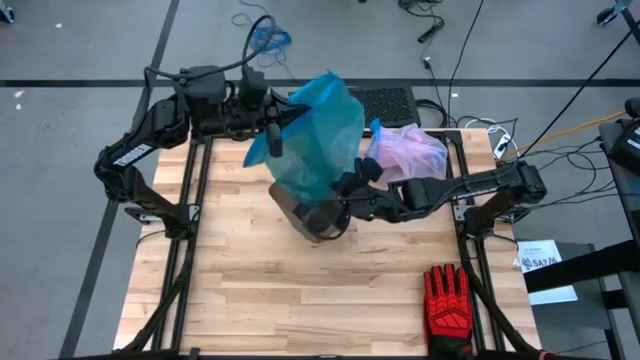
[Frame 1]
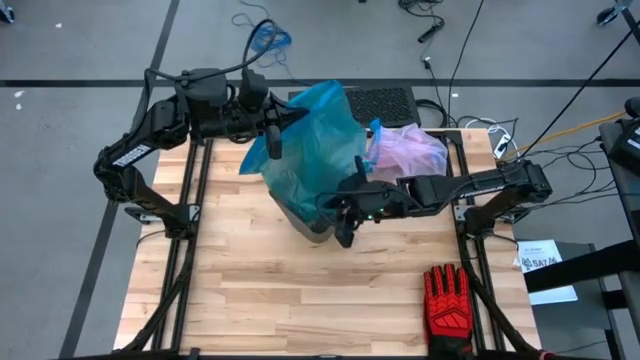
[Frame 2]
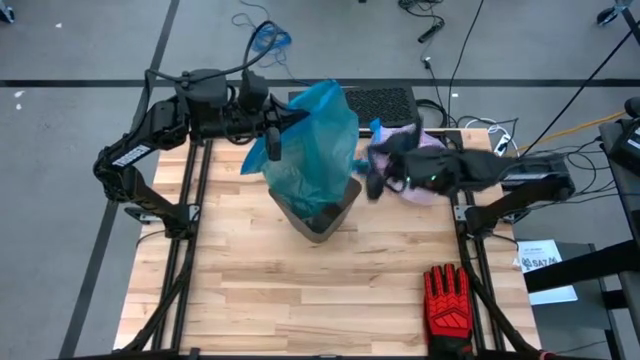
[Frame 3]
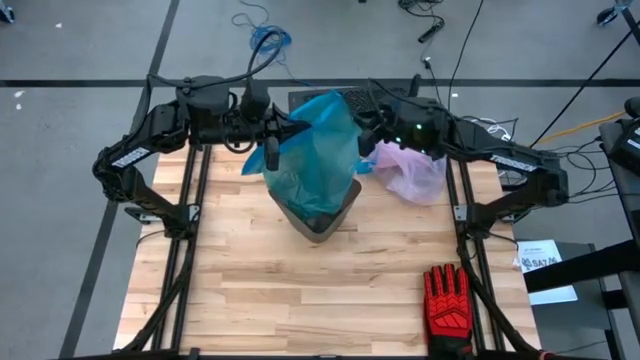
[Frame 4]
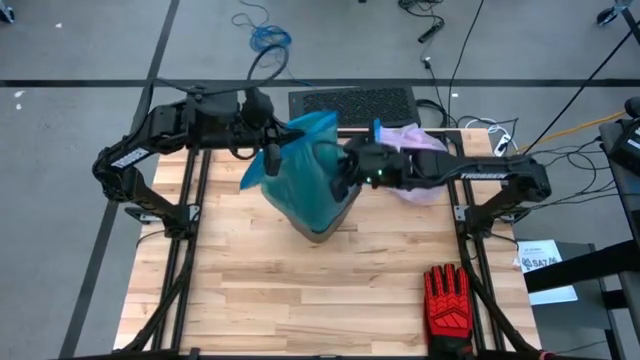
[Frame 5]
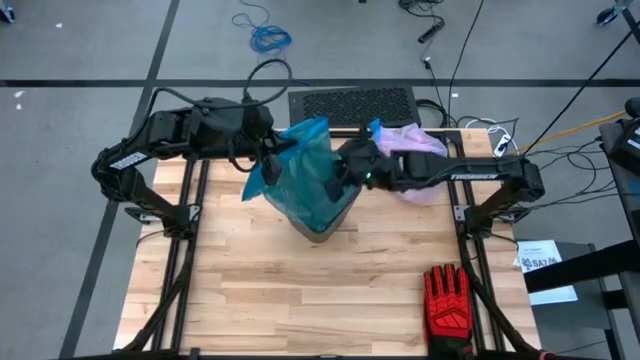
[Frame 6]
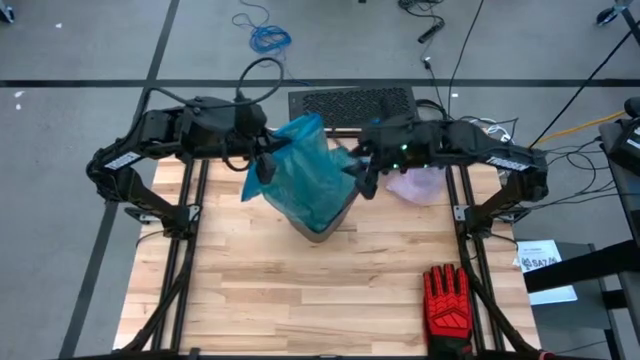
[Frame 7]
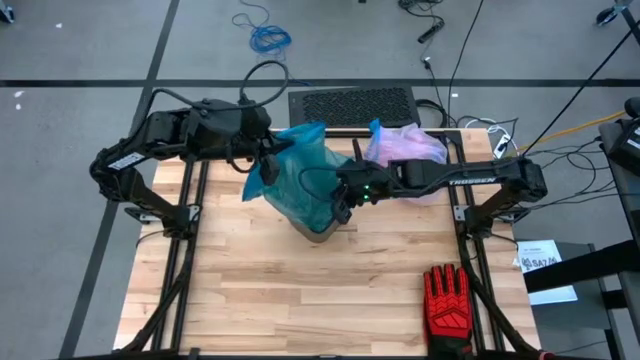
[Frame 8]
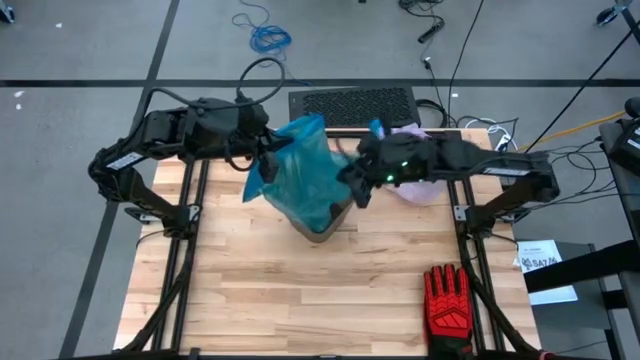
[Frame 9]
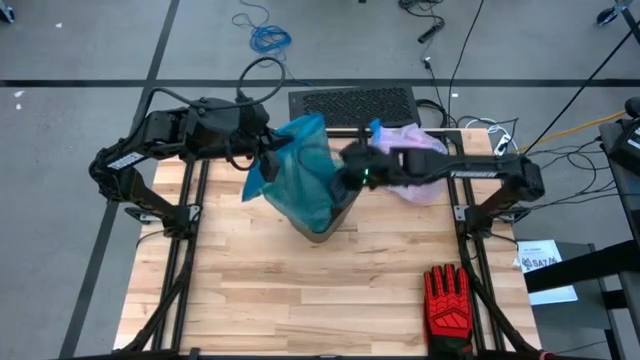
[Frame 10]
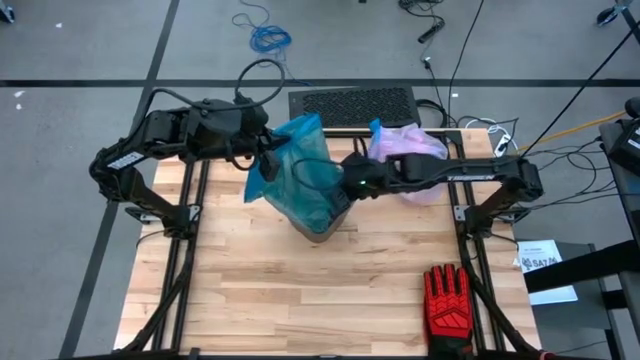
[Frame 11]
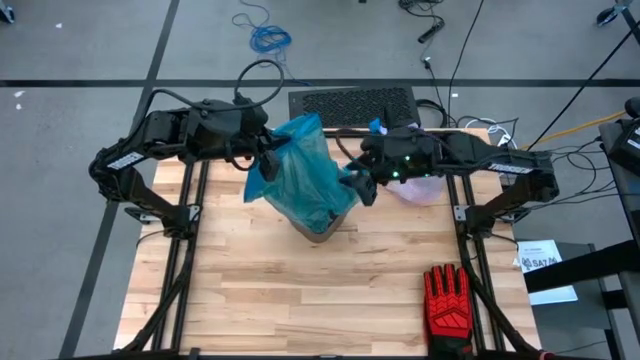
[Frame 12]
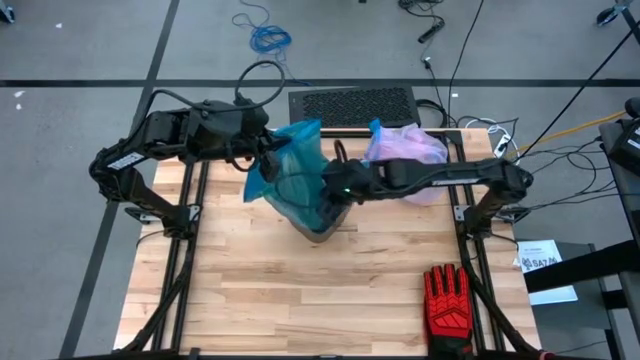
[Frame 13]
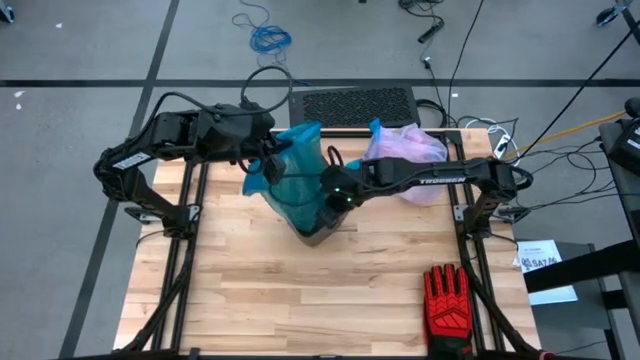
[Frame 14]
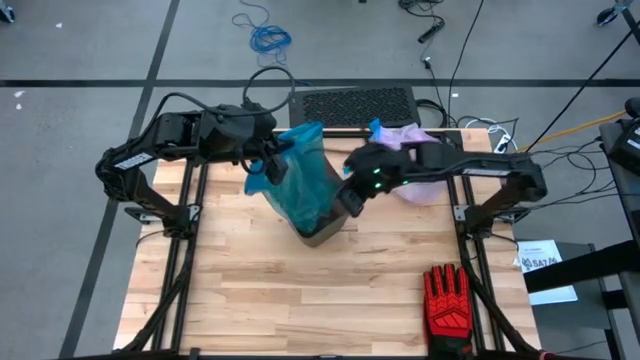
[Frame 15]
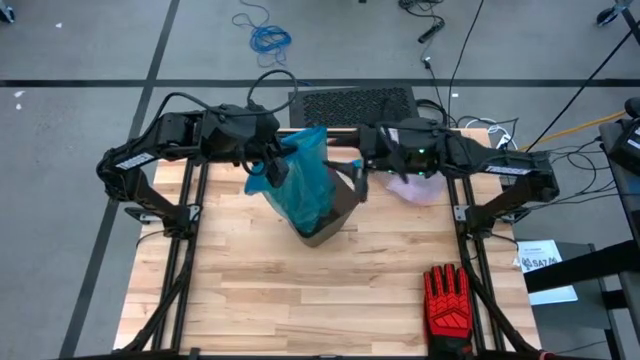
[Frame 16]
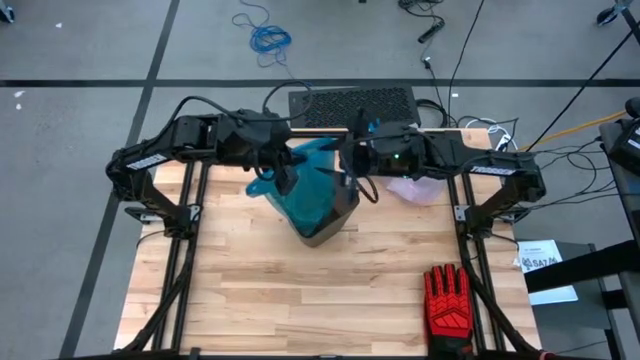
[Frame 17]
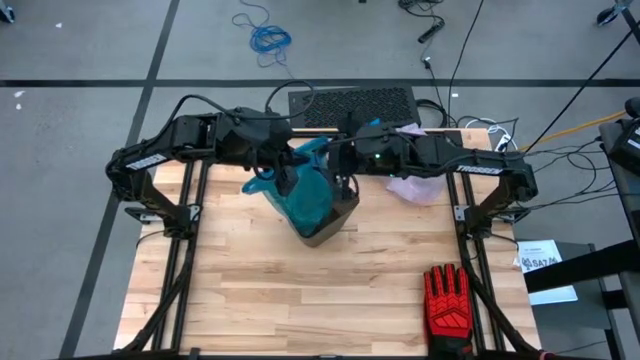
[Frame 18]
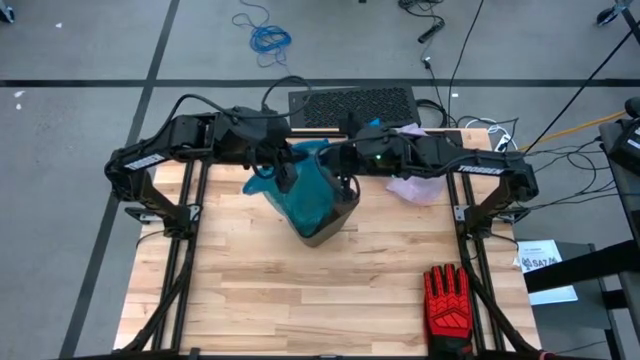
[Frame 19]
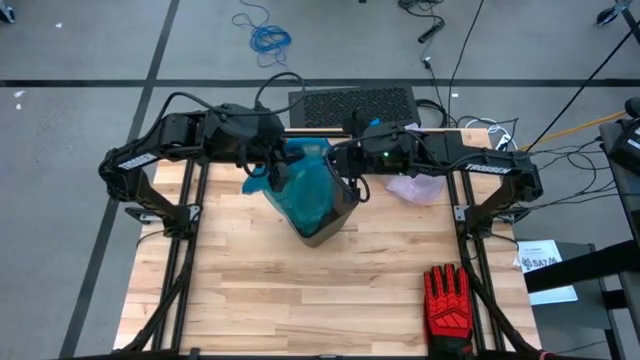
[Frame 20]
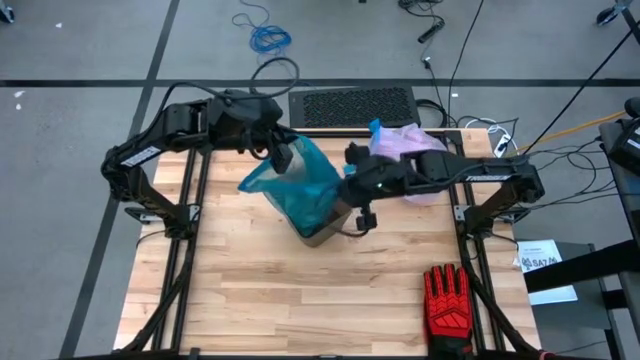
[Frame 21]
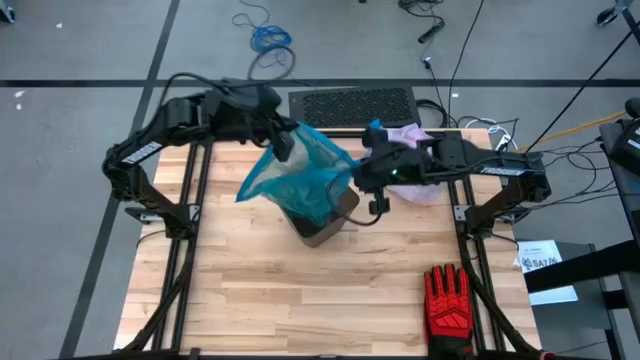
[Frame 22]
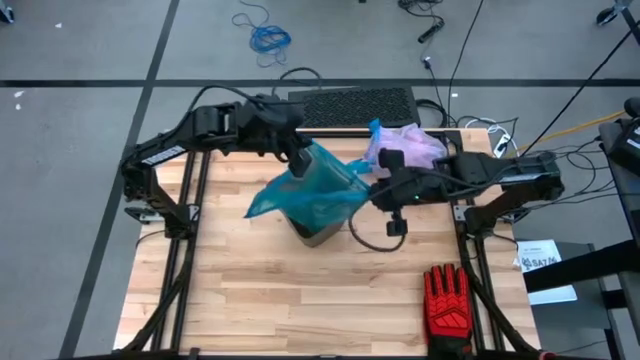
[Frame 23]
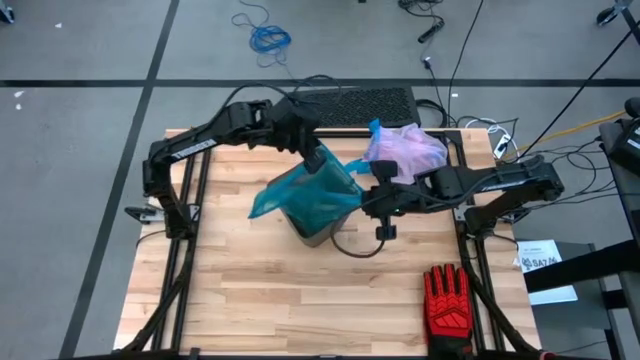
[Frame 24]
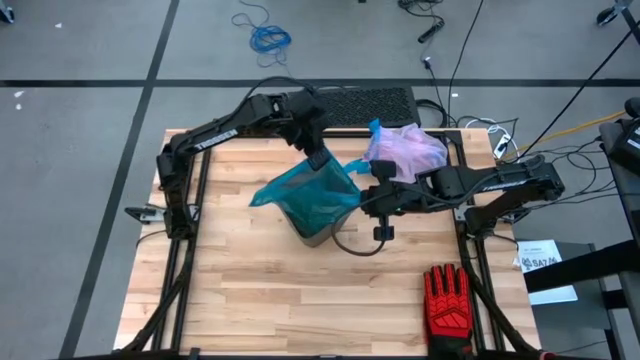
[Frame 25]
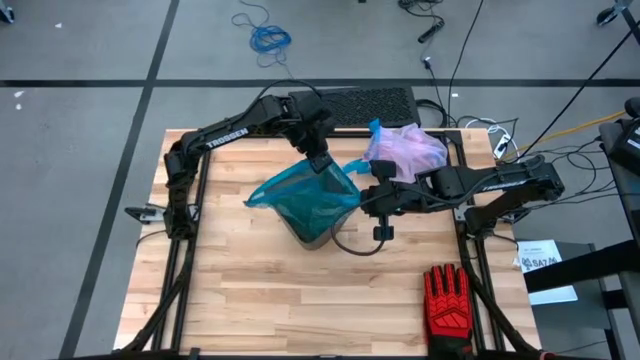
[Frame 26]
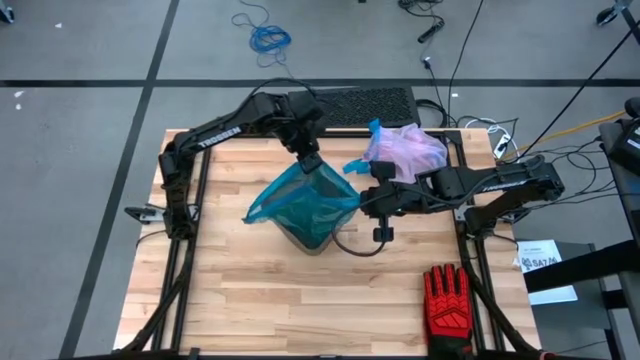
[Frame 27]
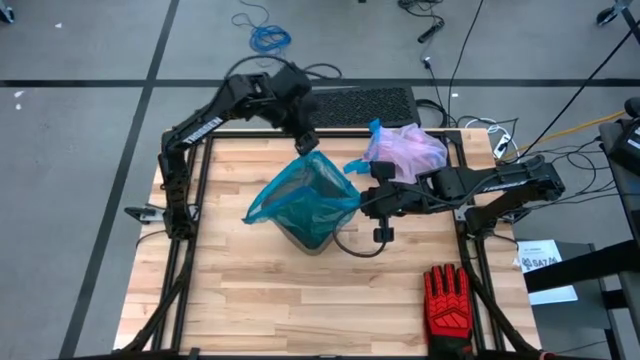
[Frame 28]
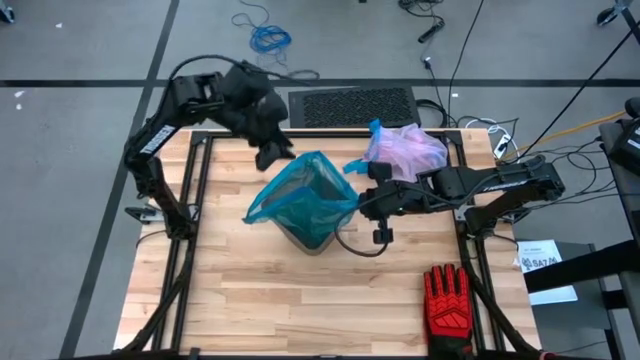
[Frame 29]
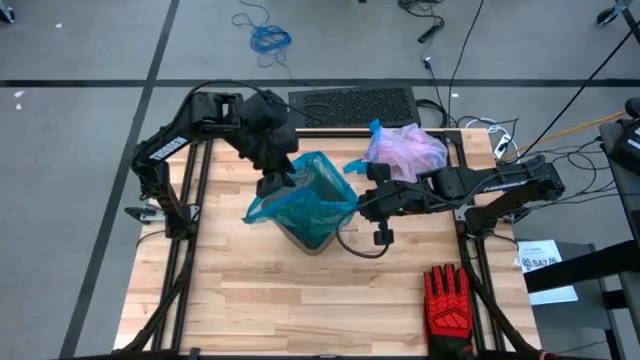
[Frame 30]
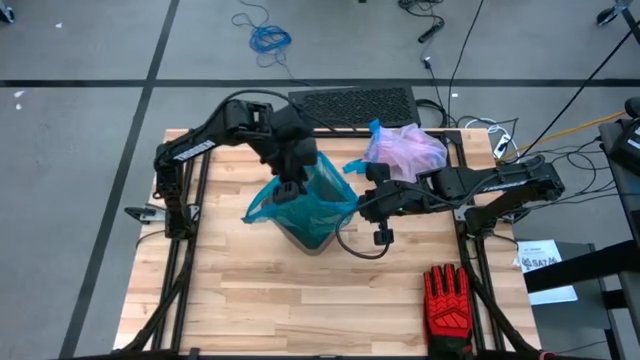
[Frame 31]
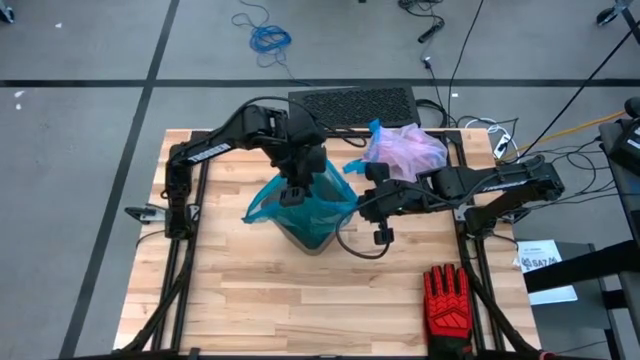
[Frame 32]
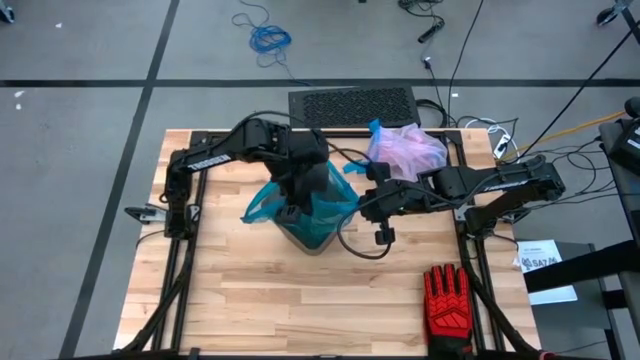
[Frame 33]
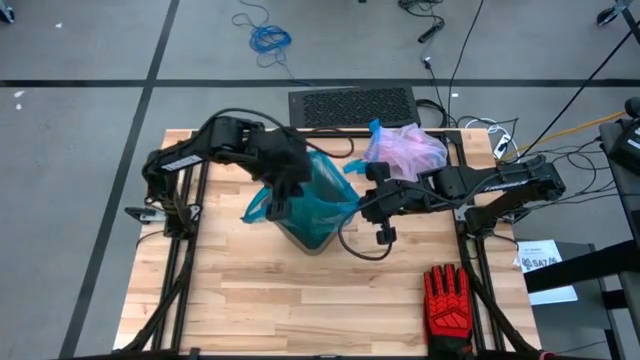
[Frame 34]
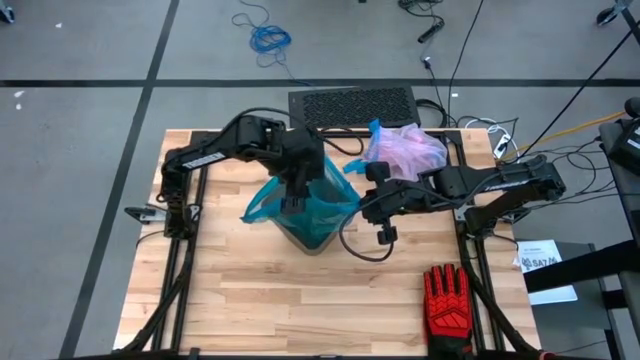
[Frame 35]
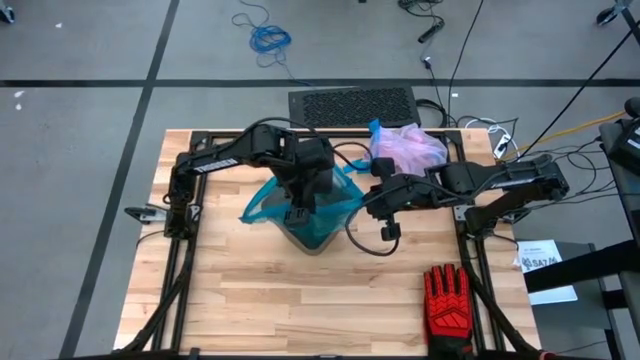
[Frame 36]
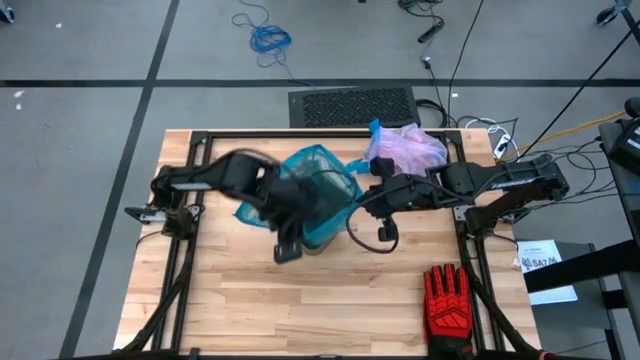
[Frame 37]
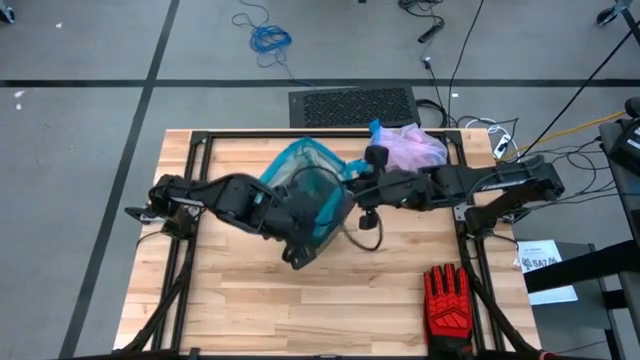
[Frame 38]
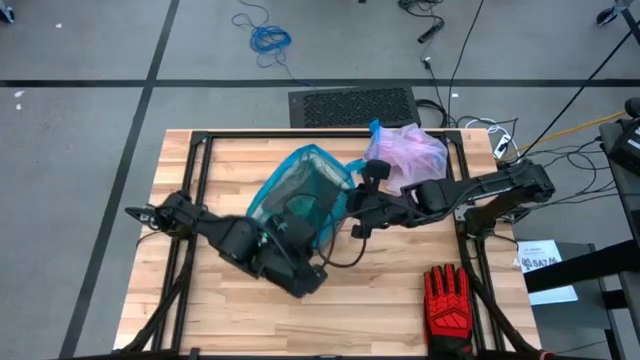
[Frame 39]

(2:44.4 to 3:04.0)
Task: place trash/remove bag and relplace
Insert a new trash bag into the bin
